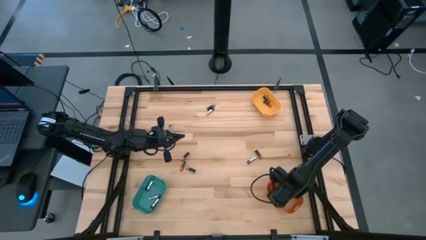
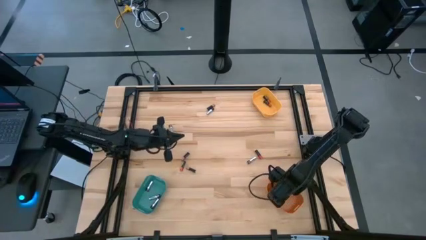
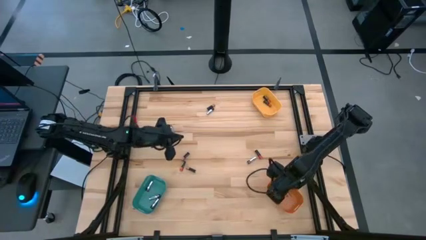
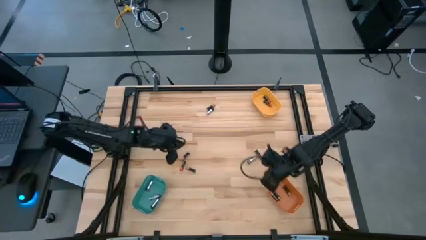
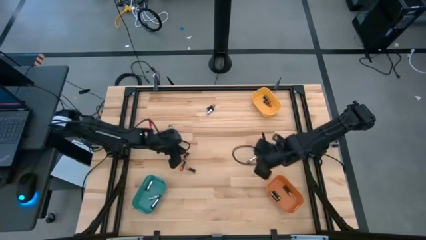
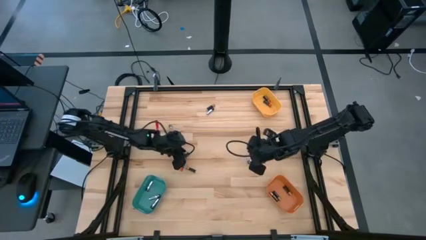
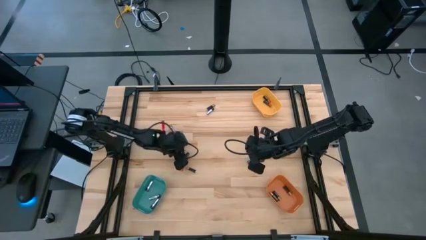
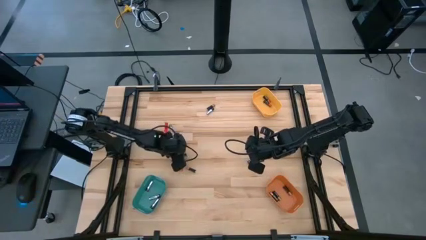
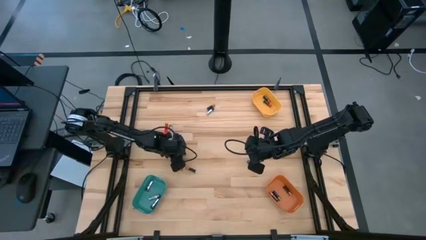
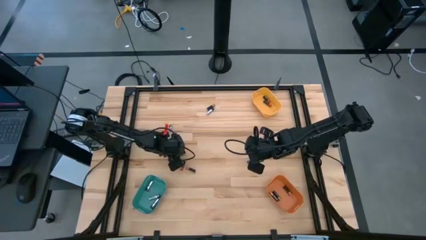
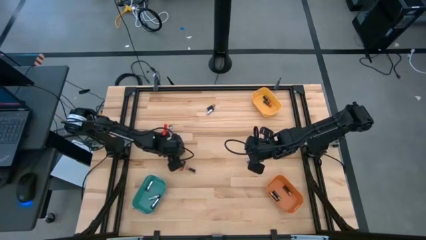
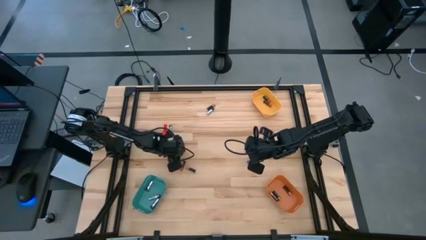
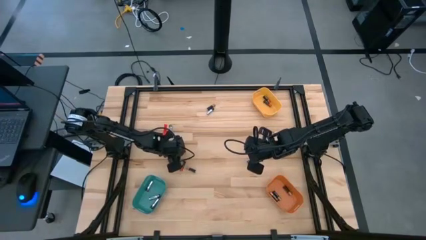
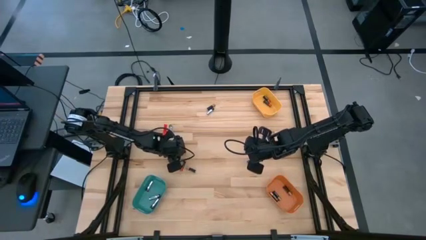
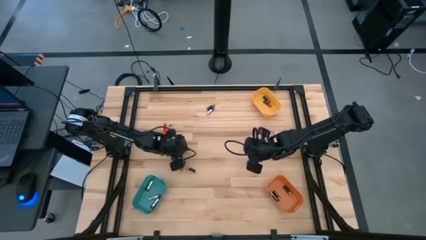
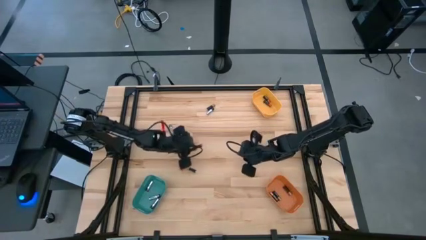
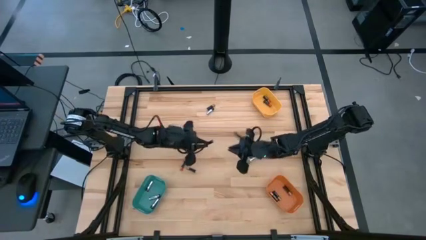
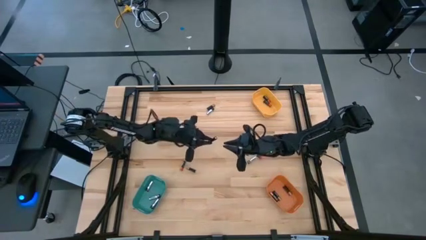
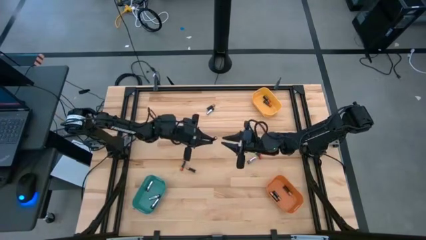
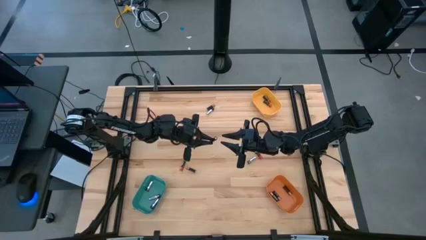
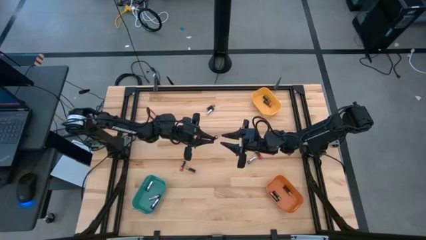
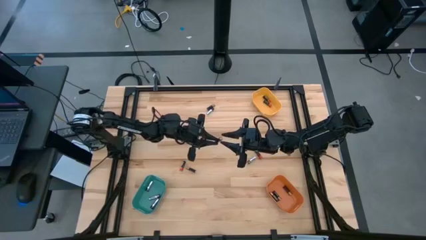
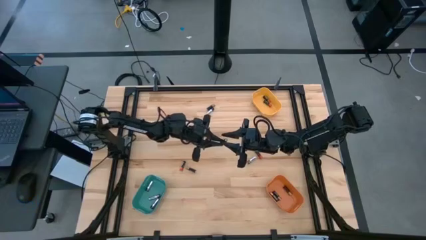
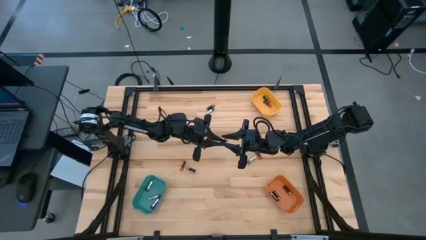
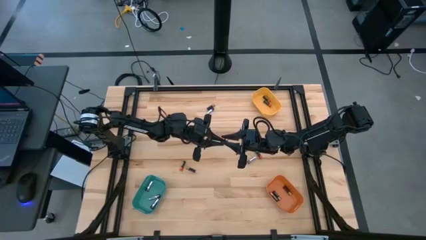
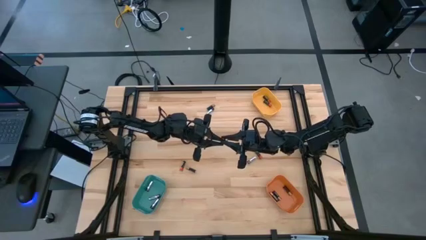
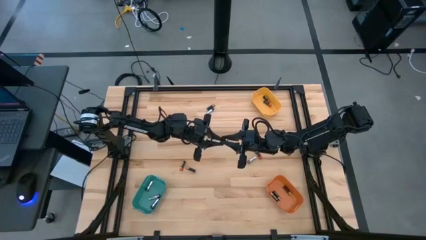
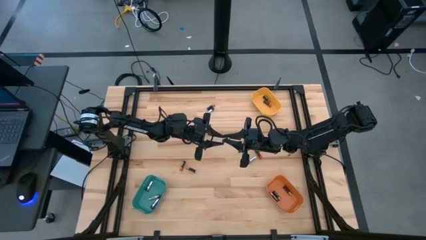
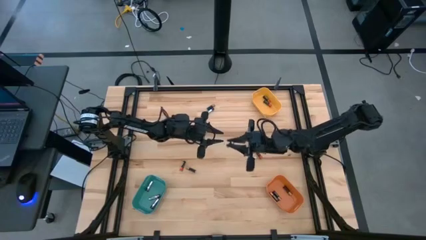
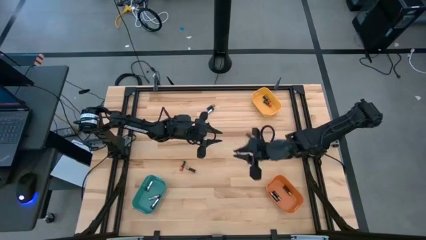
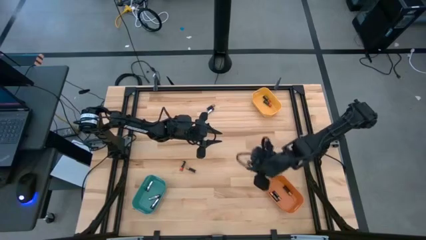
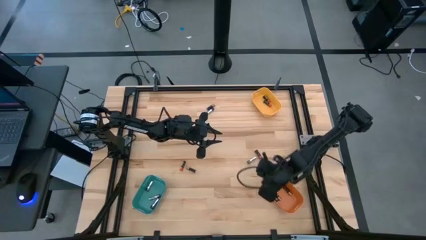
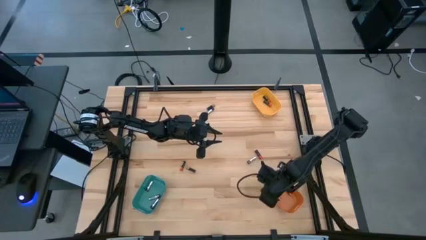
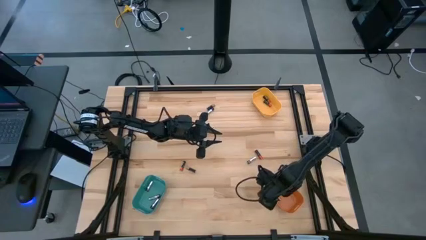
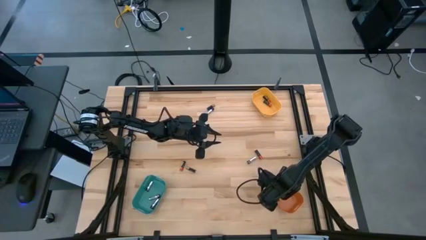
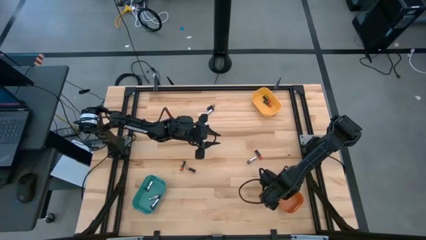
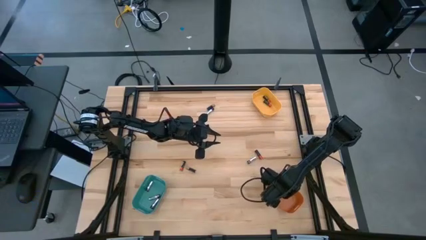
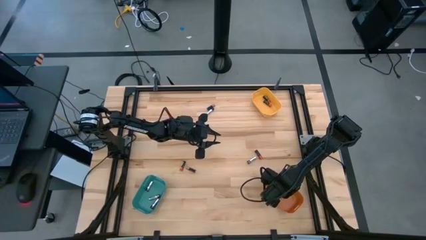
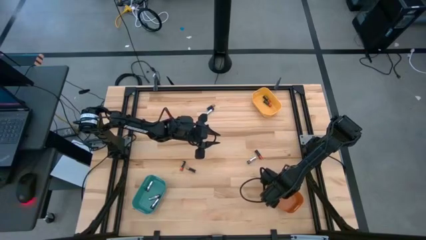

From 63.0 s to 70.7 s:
Task: Sort batteries
Put the brown battery into the orange bin

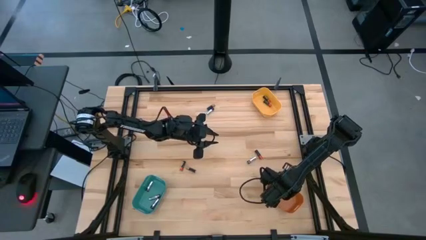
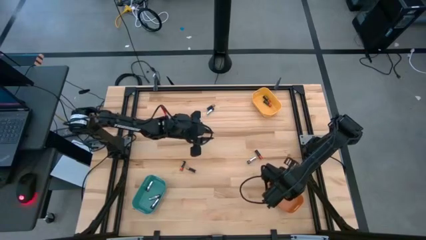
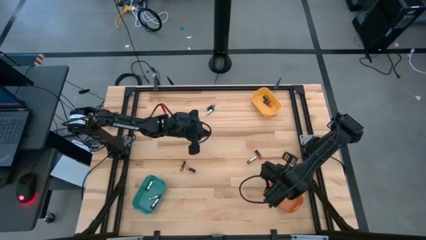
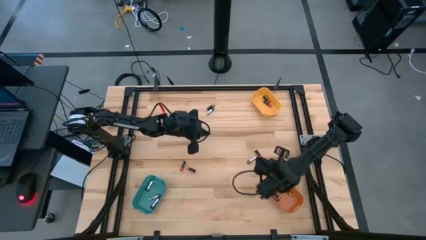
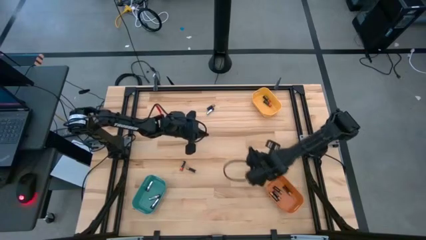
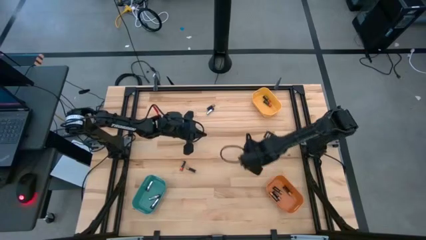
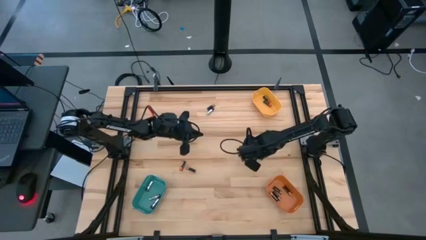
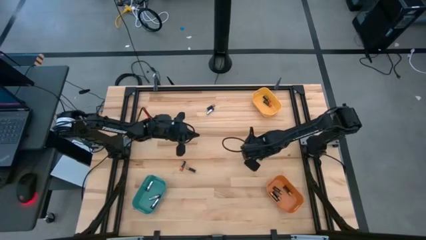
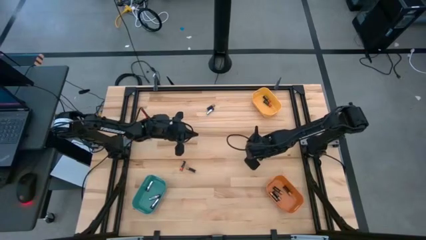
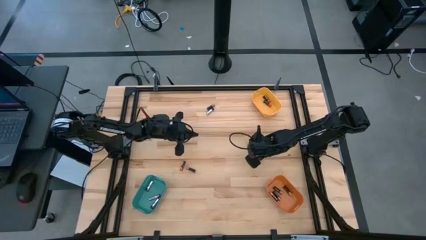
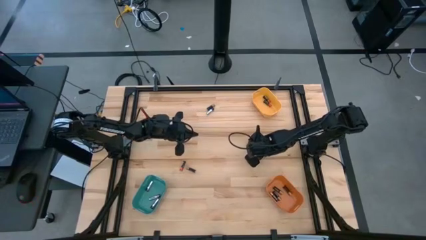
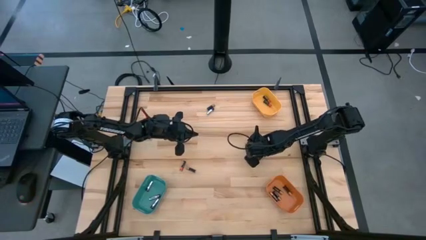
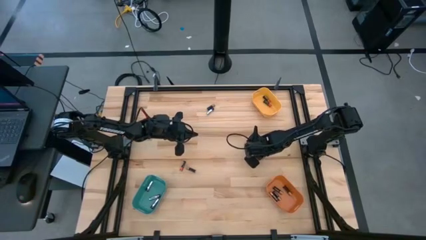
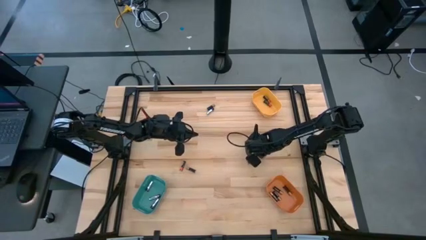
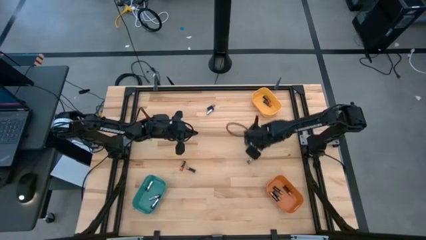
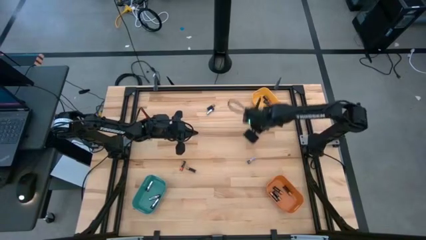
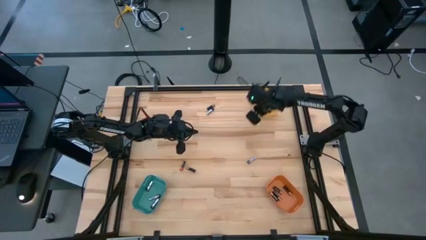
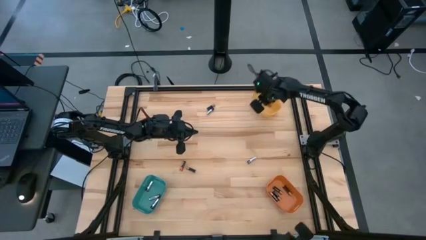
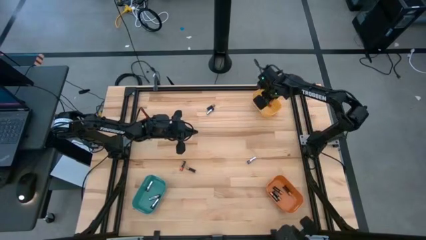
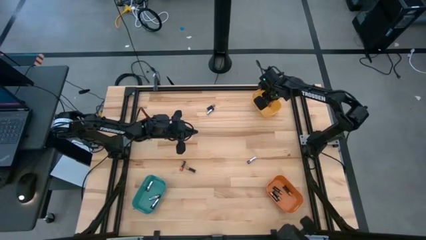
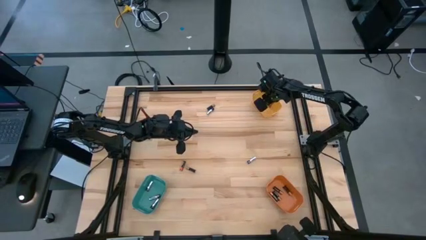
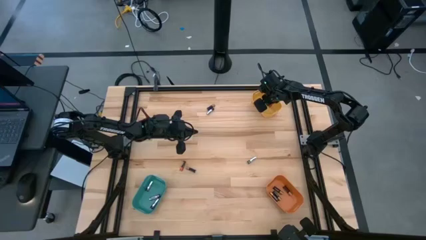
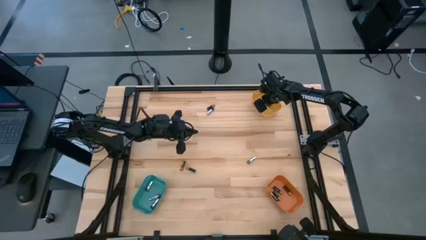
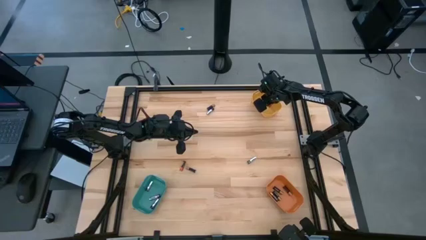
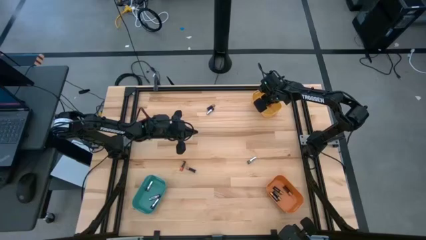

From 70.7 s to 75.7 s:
Put the red battery into the yellow bin

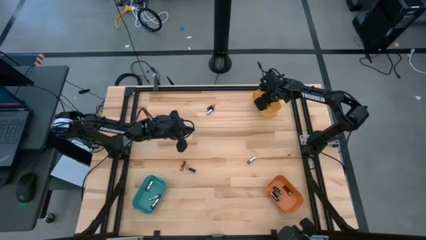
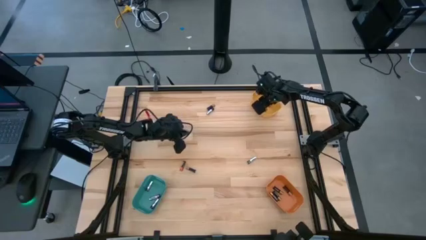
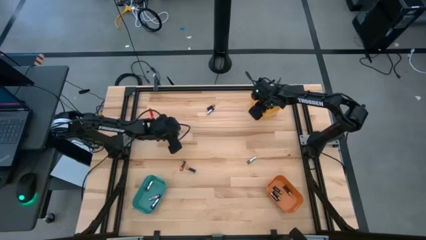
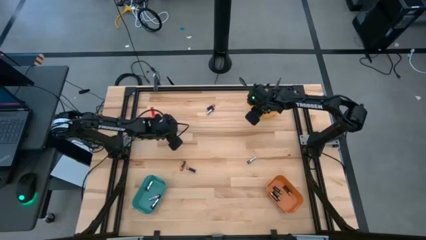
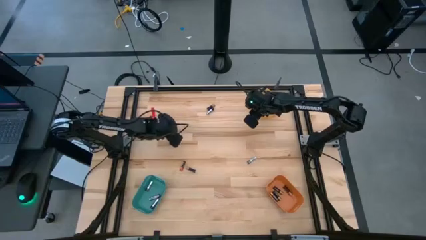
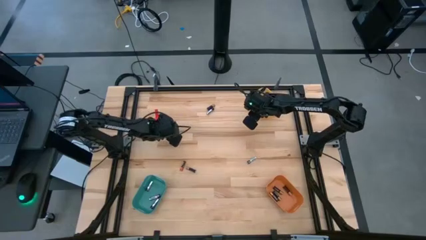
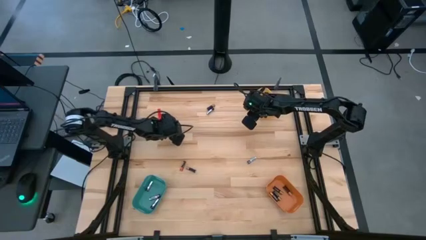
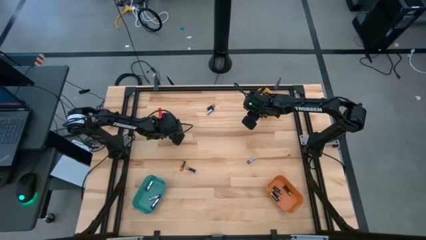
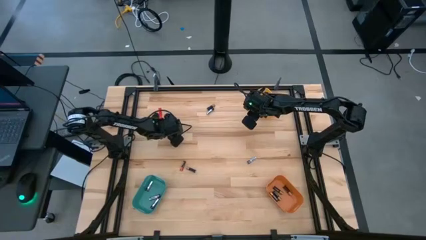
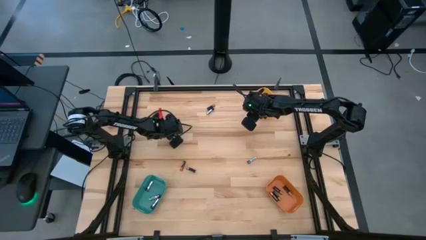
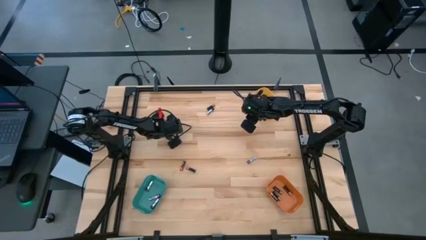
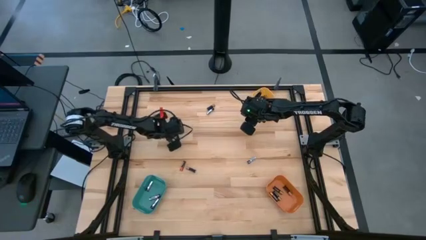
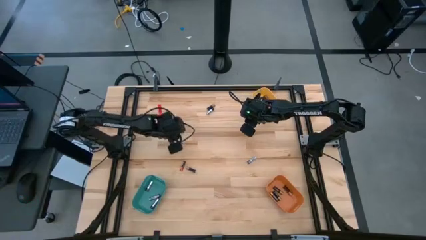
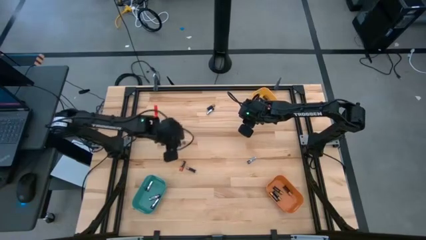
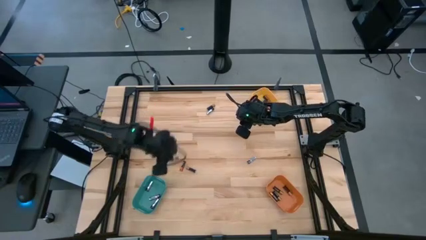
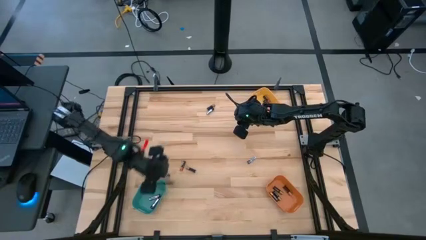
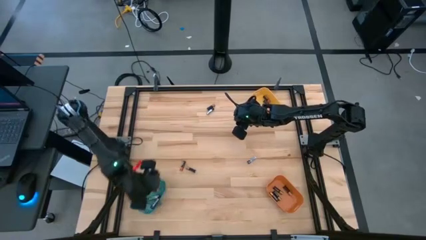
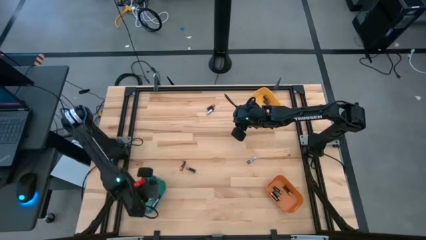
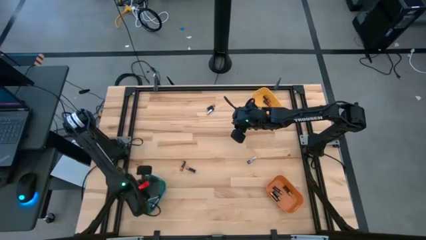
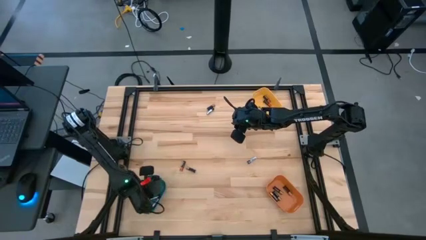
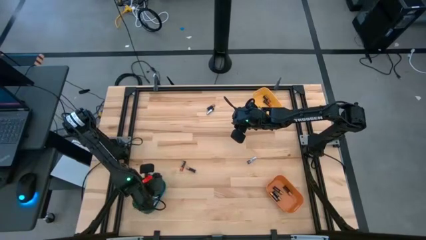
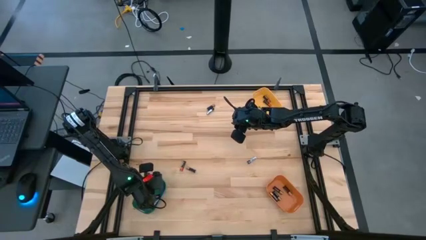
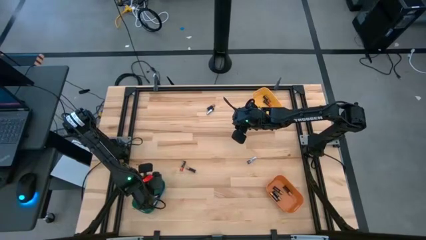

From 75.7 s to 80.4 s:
Put the silver battery into the green bin
